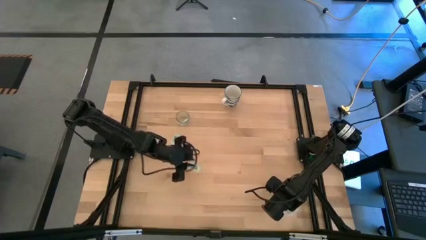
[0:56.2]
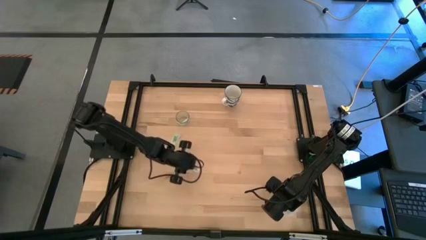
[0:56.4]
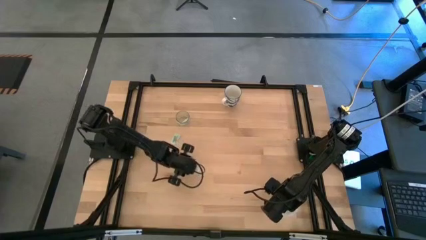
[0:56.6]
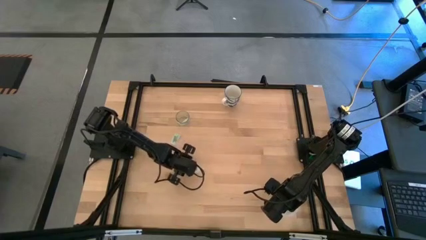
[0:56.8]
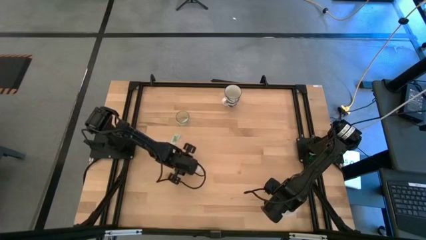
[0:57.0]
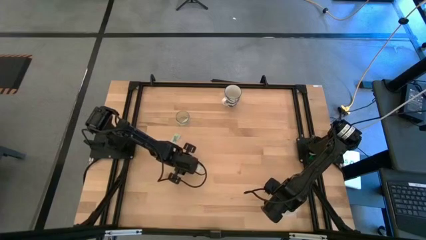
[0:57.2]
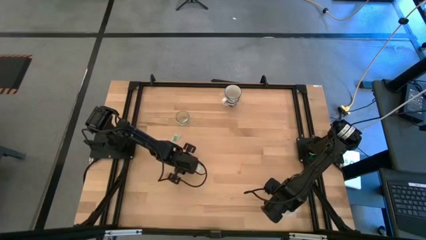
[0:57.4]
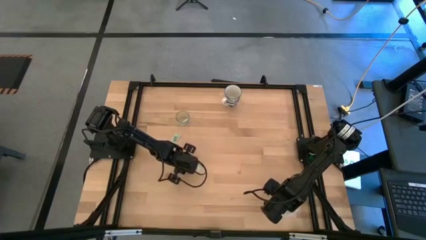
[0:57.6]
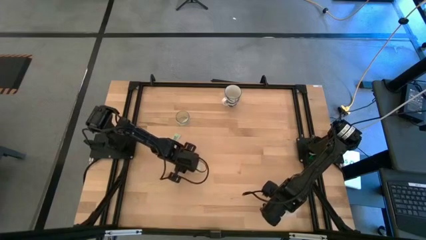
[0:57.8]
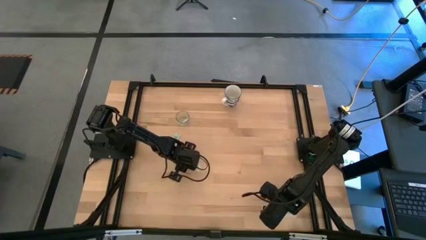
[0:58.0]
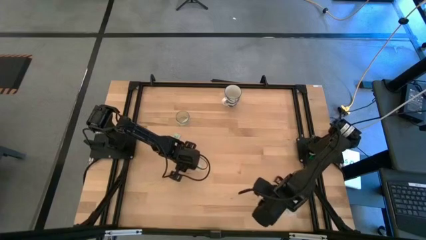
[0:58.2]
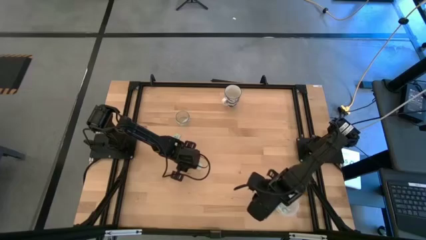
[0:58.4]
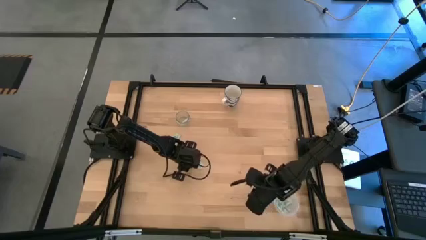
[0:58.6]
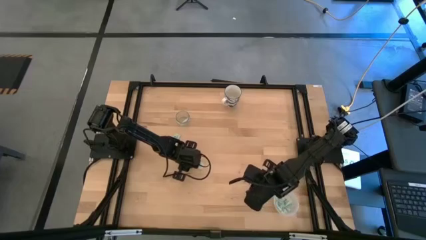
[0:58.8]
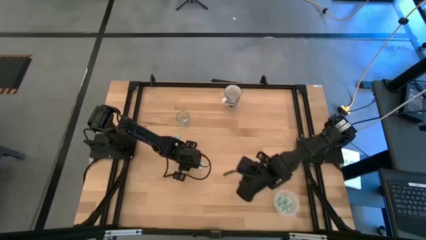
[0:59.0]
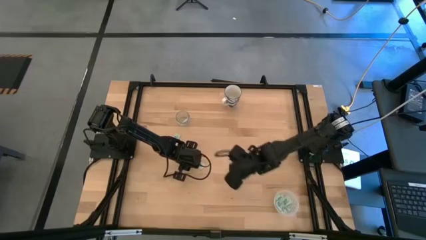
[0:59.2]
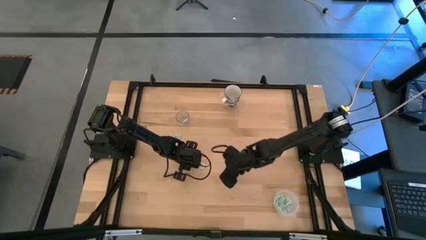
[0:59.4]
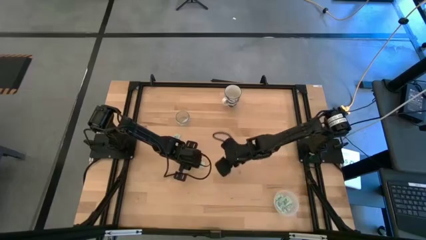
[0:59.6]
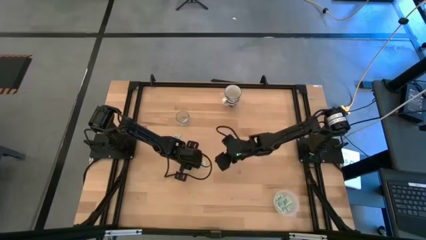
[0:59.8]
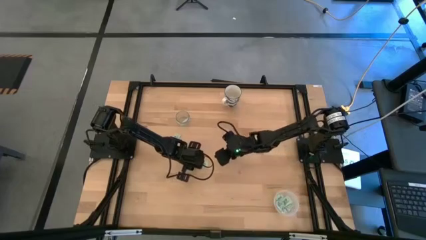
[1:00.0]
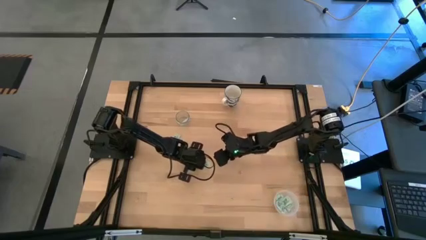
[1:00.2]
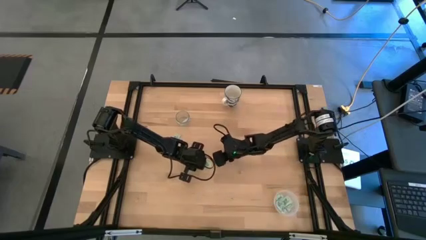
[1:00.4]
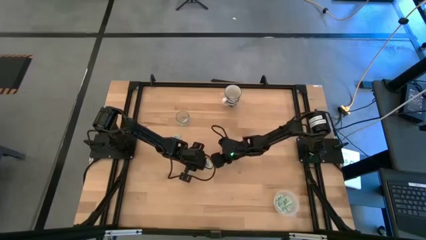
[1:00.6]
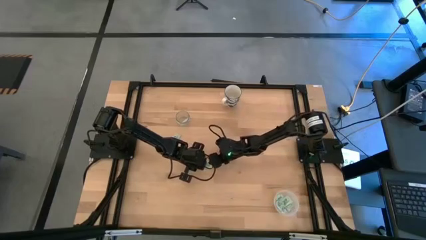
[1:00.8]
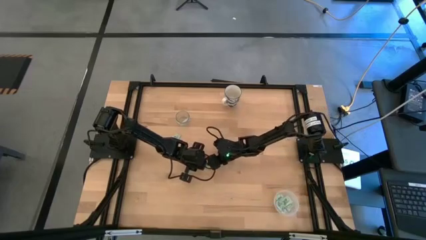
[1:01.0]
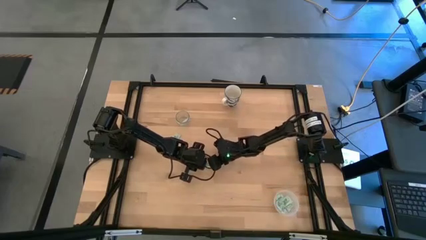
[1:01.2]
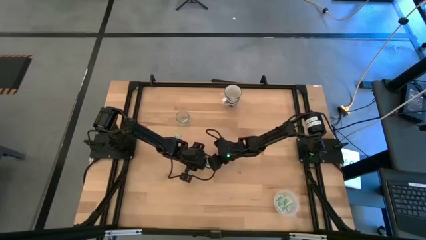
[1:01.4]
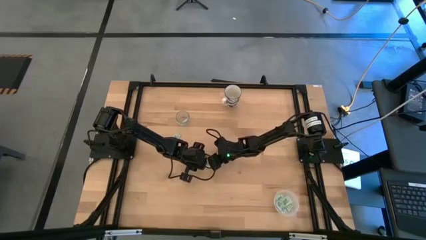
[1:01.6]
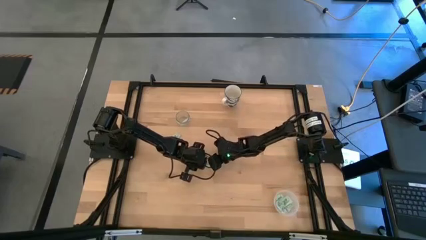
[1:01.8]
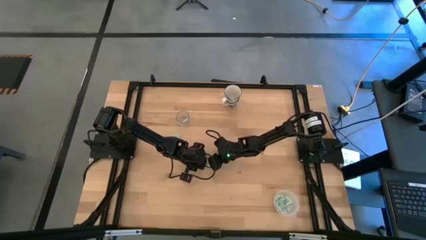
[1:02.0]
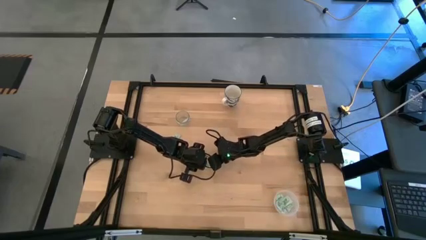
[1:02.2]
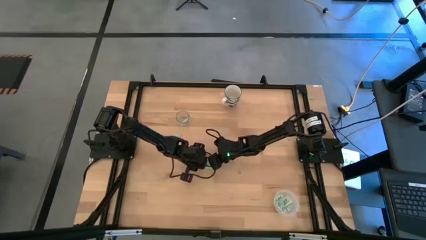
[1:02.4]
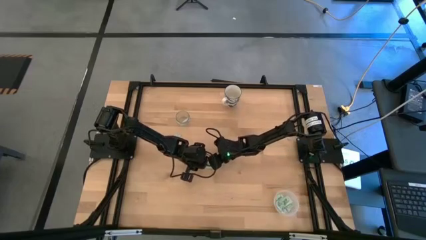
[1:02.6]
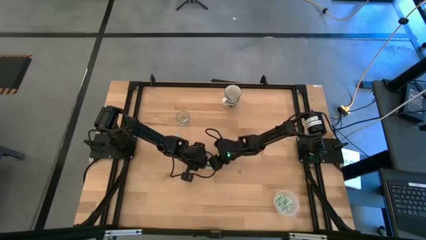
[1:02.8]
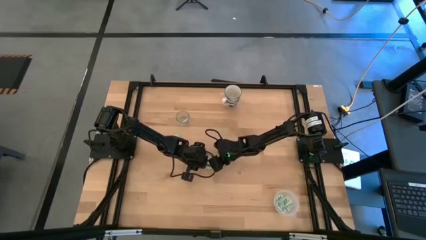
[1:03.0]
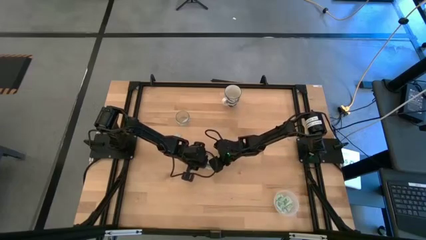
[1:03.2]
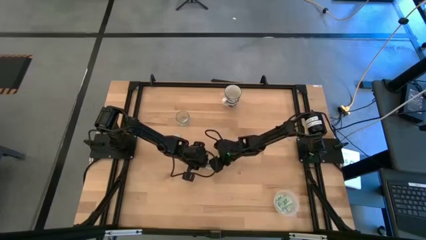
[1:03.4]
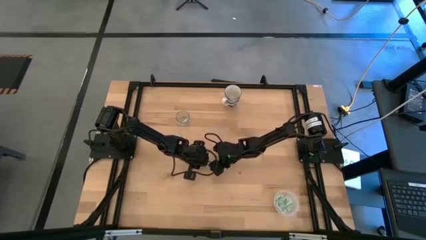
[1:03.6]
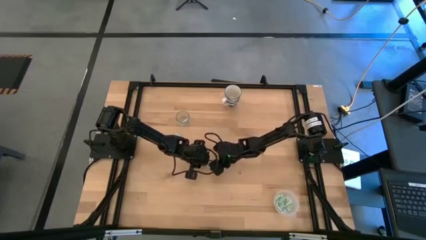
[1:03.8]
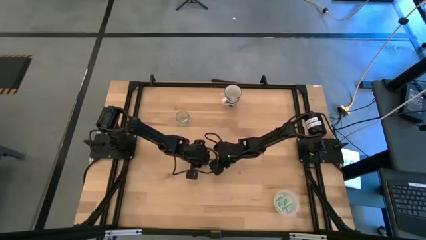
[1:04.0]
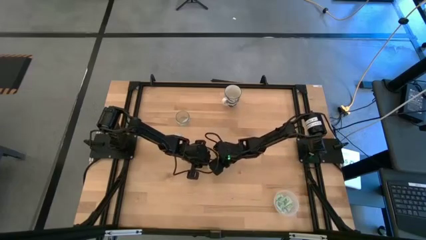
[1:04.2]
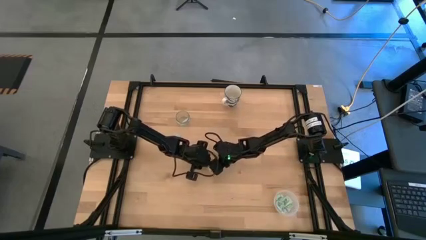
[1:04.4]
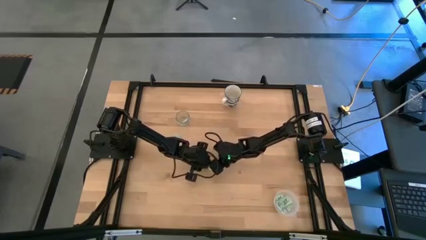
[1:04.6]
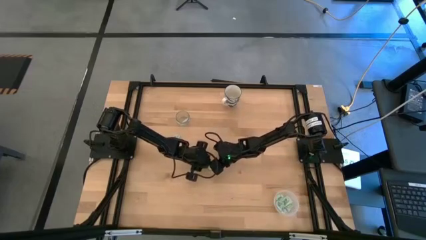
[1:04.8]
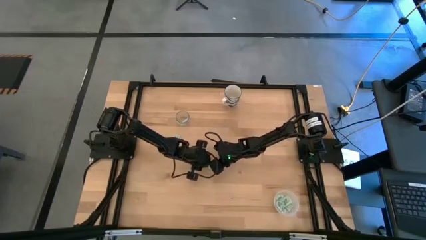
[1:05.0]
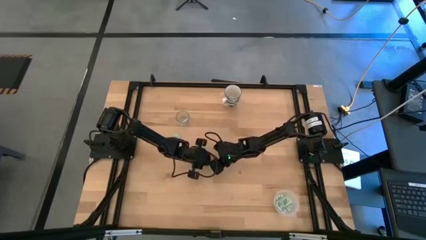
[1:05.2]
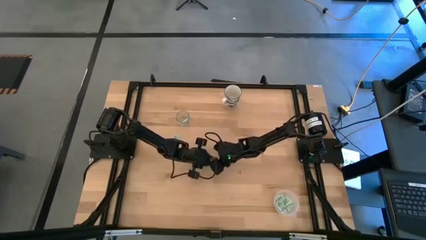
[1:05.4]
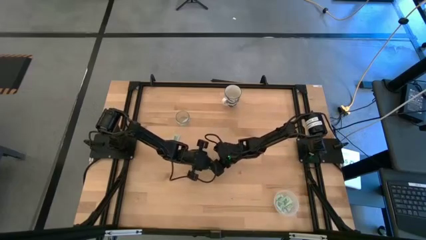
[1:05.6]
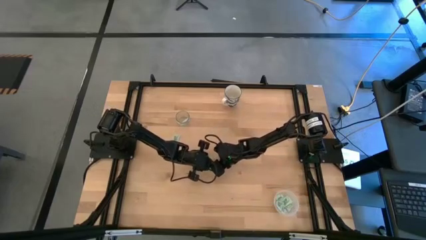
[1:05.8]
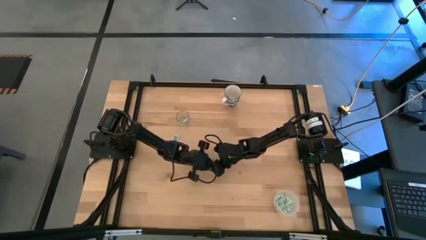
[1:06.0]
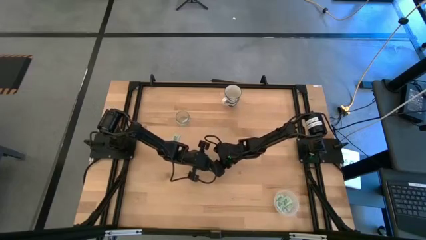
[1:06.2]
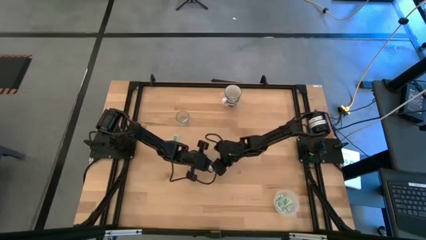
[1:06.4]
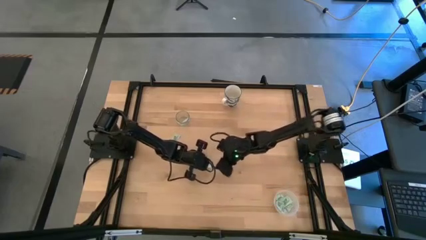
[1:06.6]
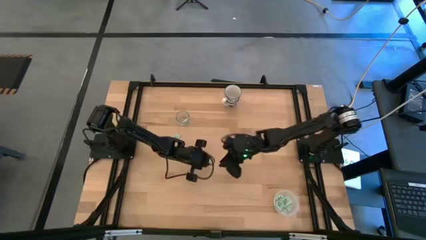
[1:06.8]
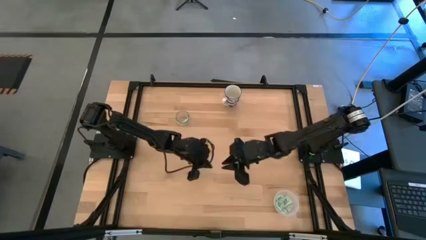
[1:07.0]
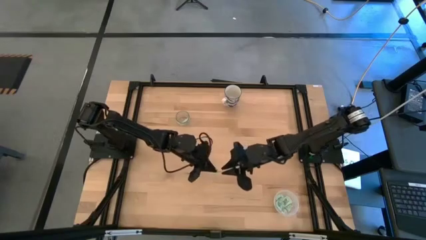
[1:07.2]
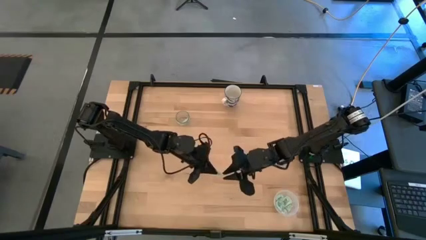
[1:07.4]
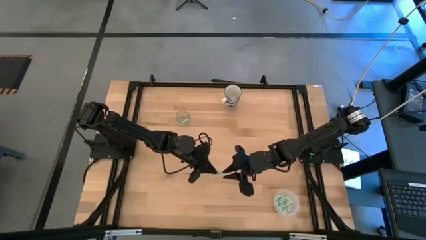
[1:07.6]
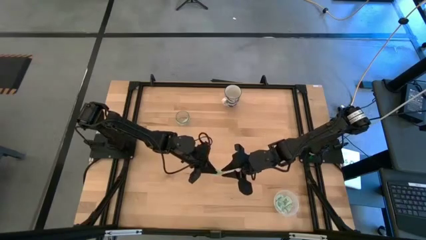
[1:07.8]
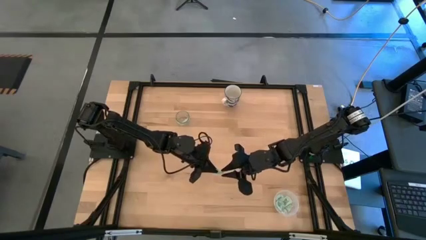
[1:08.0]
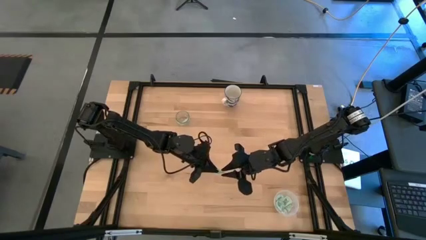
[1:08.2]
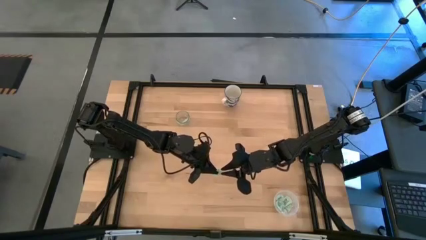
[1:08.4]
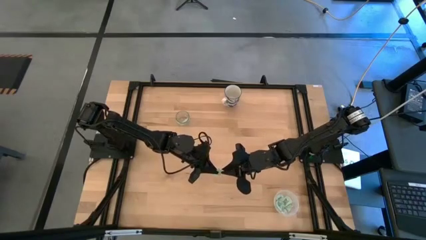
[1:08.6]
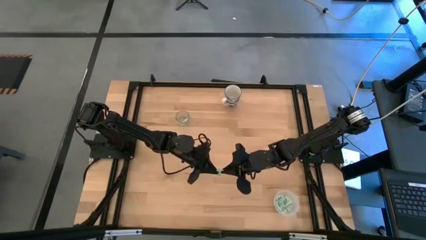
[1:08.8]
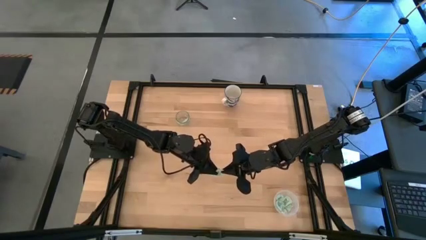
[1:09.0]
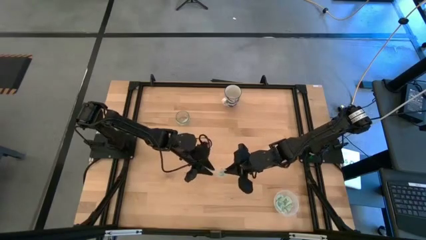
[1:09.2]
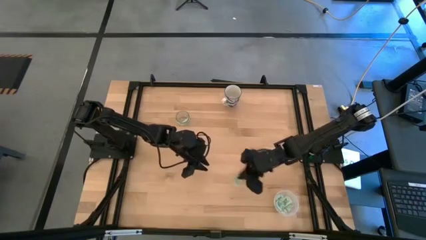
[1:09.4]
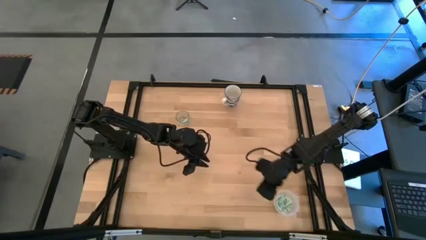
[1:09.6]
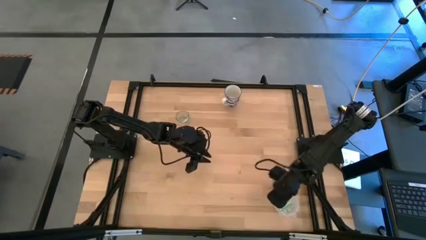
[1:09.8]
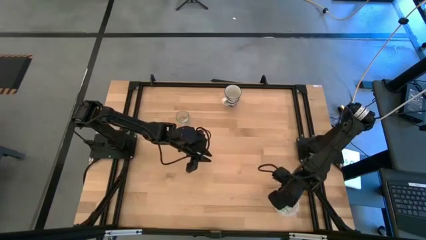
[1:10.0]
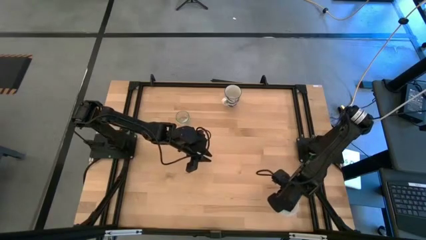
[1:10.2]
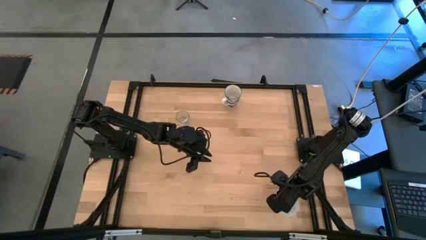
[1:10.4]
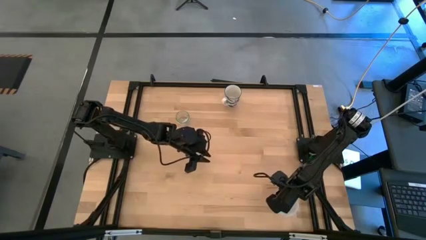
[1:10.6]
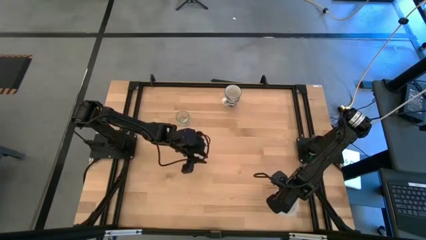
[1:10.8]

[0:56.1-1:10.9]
Task: Pick and place Stevia / Truvia into bins
Put the green stevia packet into the transparent container
